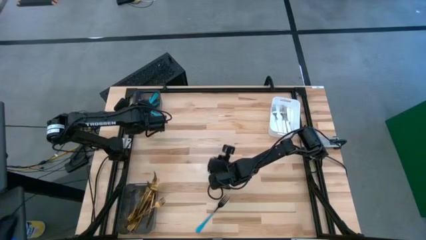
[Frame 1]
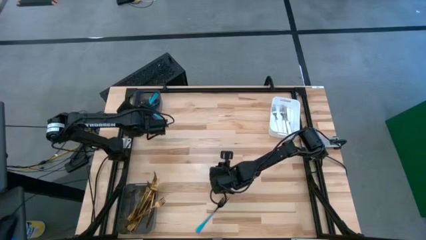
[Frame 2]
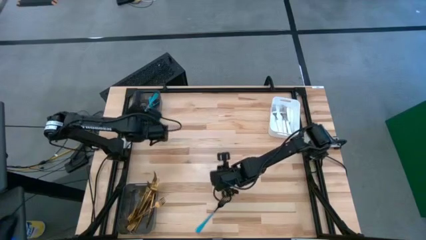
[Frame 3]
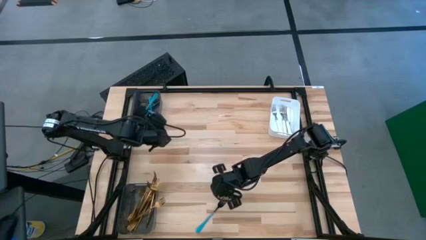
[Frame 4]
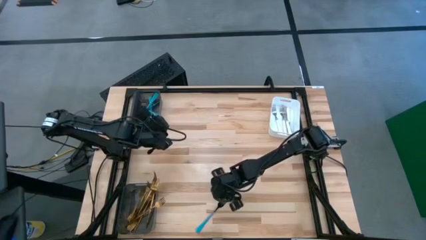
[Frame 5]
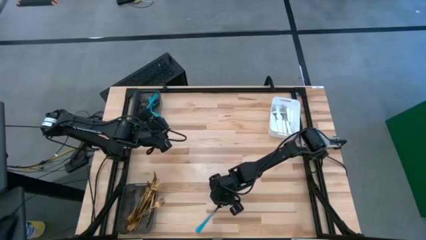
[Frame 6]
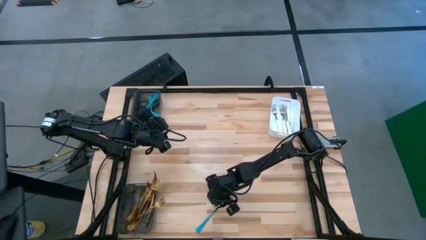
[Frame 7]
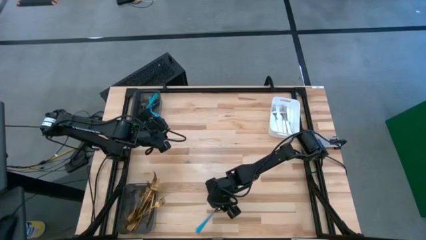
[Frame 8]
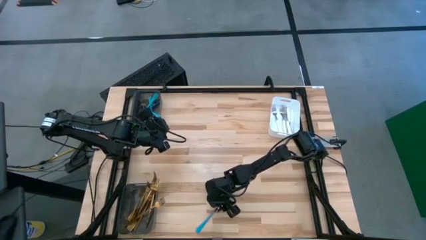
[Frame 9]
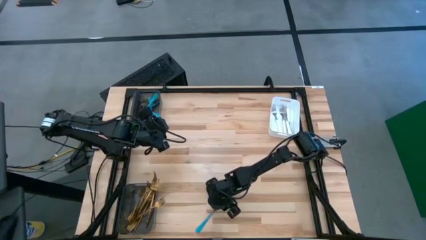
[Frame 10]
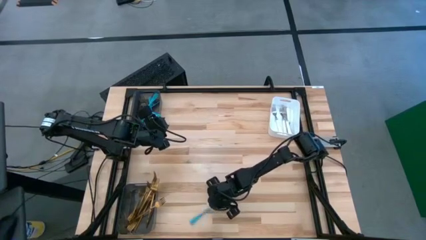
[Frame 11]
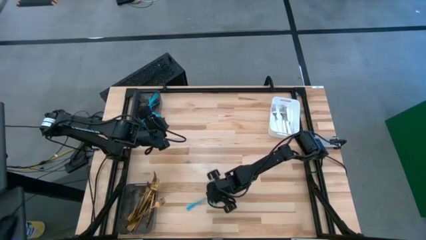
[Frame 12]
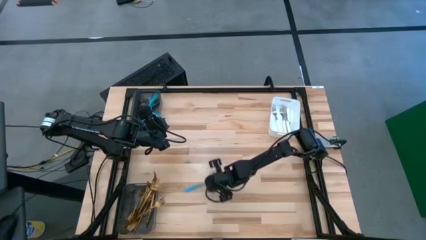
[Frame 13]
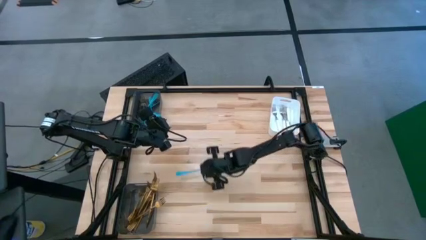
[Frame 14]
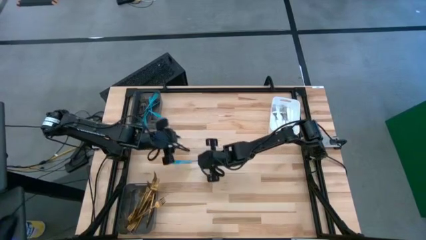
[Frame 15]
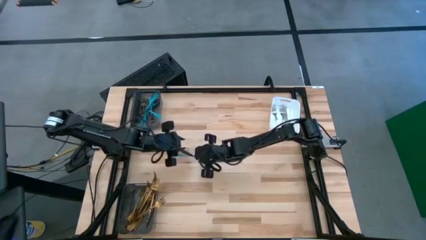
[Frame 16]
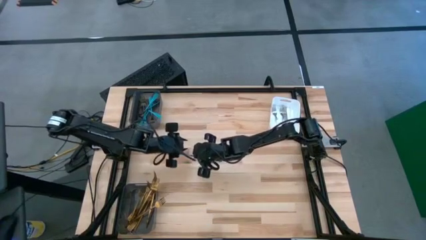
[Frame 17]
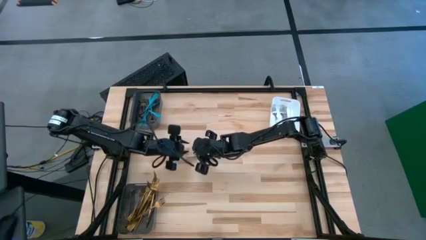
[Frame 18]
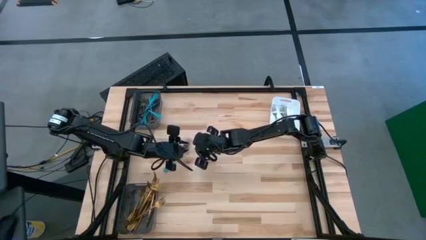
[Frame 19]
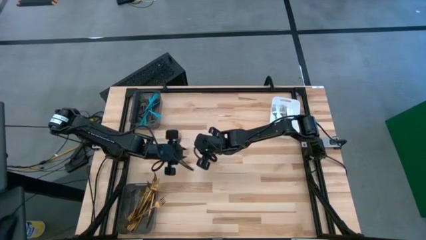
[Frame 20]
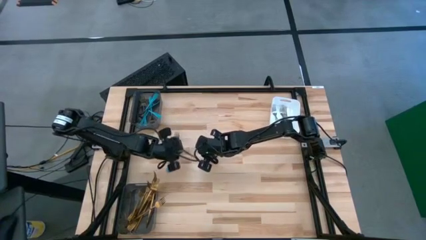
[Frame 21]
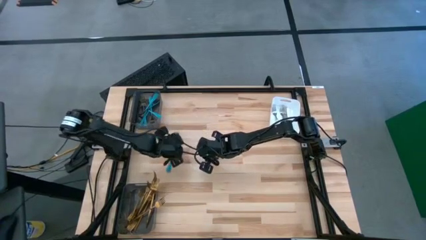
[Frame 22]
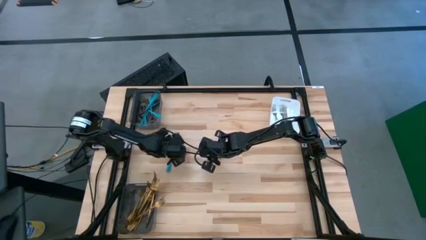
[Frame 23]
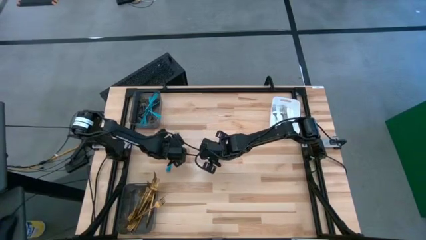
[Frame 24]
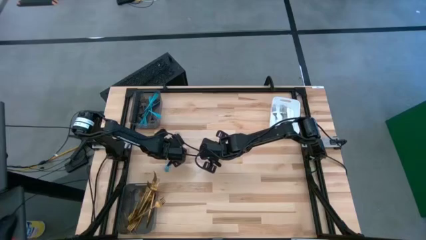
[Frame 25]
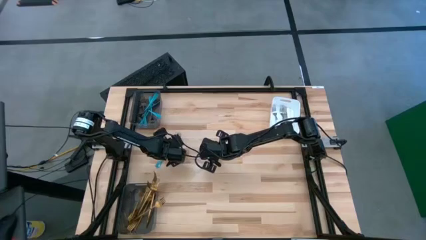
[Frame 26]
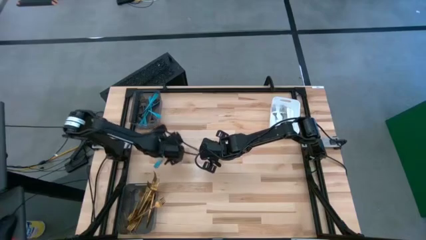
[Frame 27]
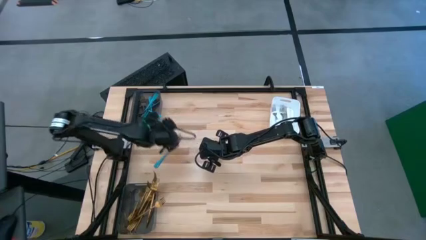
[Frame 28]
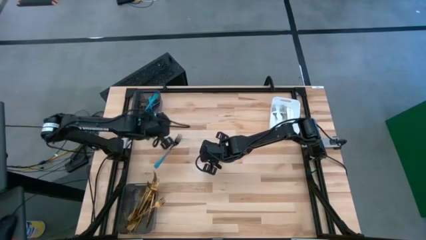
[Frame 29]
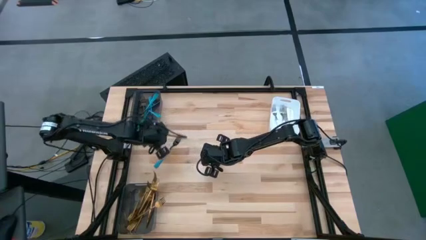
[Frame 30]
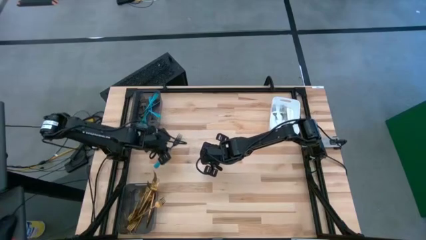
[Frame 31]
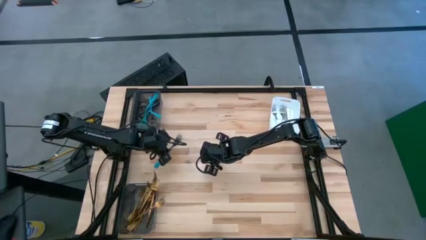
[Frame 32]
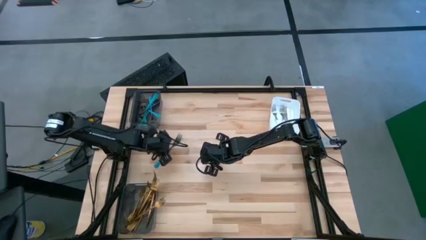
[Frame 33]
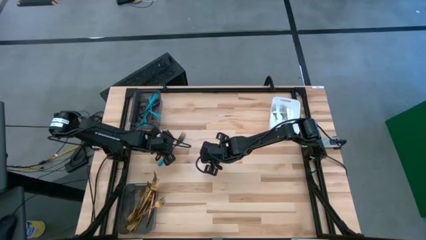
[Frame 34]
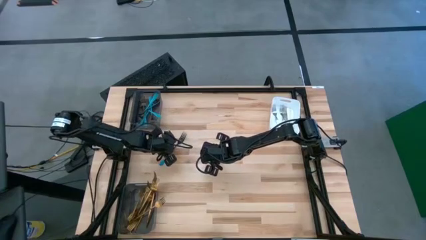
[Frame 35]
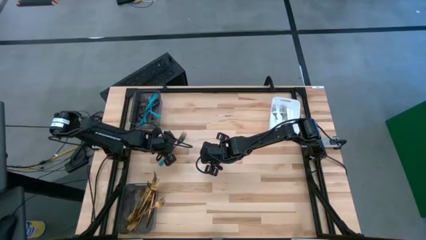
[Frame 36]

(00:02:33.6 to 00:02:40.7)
Task: Sort silverware by color (type)
Put the blue fork into the top black bin

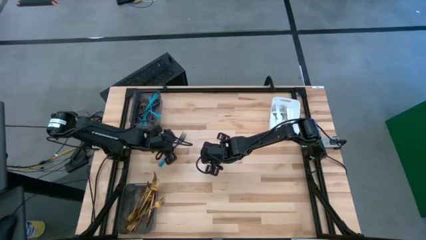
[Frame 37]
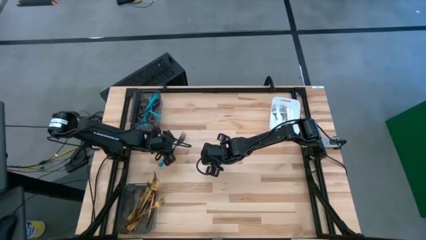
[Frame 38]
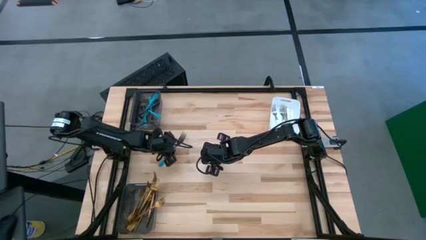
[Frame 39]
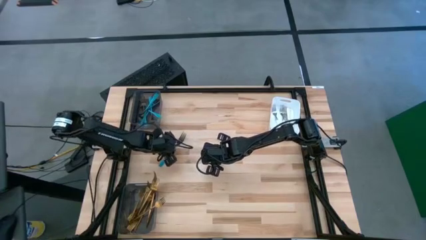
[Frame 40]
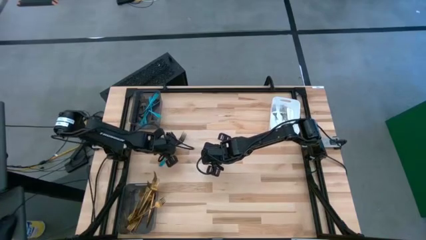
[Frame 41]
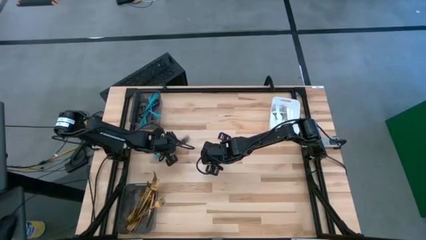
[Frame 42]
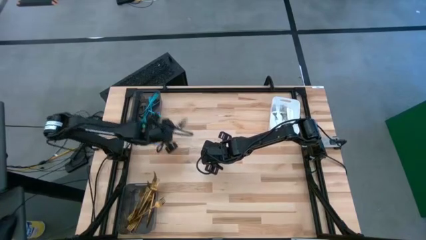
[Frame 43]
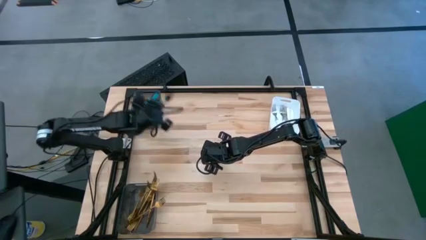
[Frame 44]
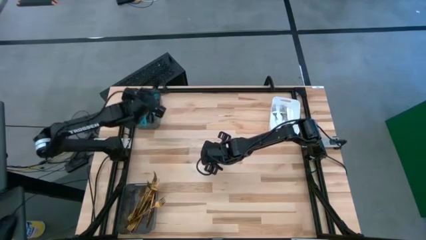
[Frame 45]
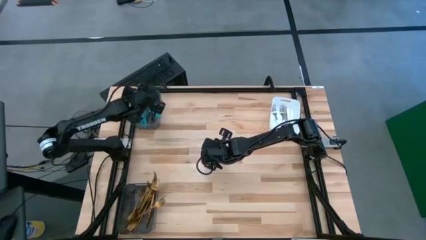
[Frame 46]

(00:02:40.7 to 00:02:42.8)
Put the blue fork into the top black bin

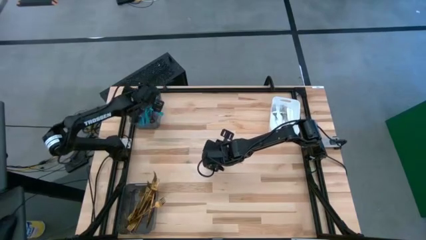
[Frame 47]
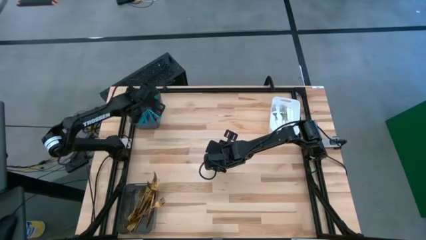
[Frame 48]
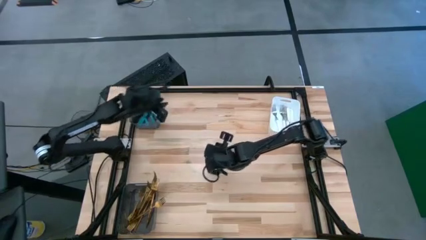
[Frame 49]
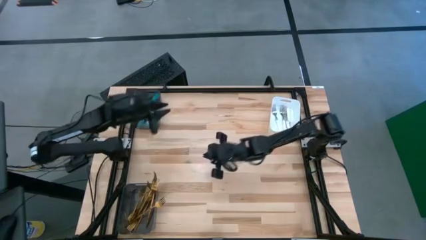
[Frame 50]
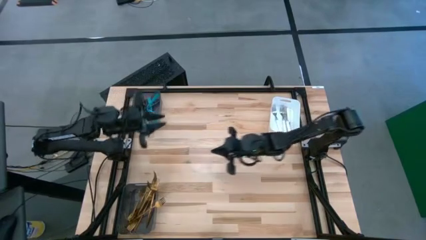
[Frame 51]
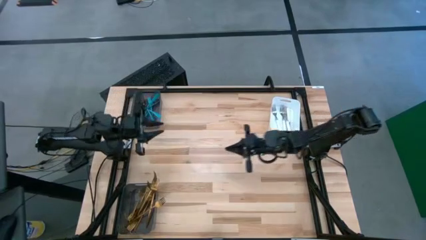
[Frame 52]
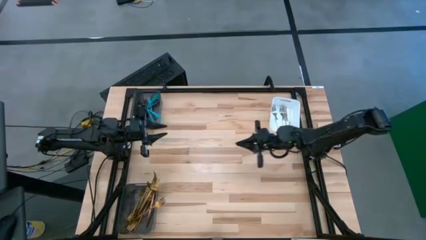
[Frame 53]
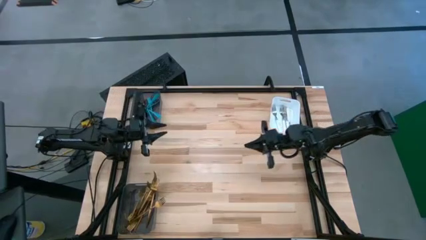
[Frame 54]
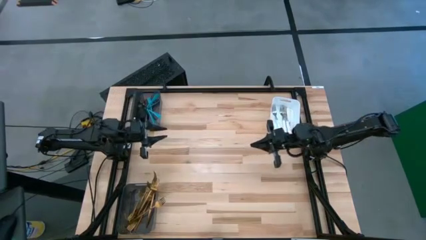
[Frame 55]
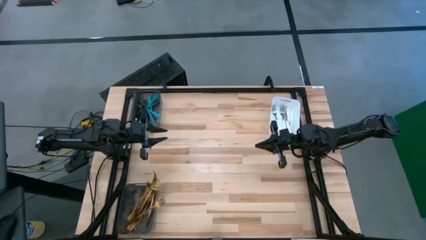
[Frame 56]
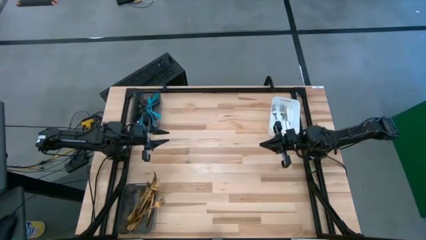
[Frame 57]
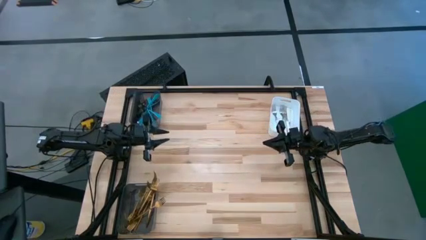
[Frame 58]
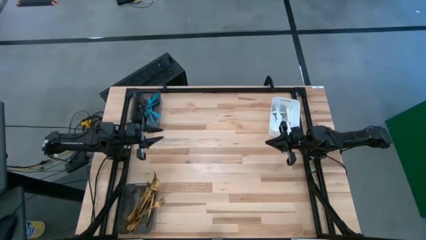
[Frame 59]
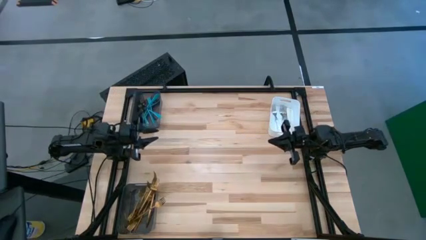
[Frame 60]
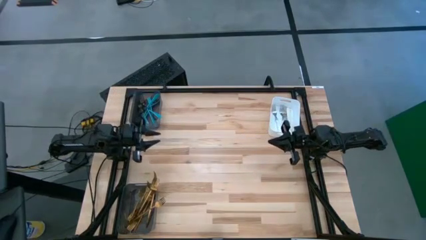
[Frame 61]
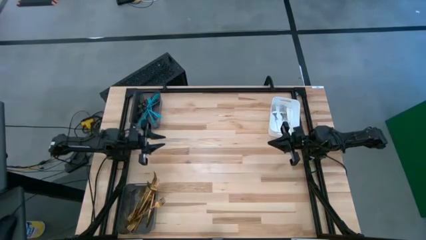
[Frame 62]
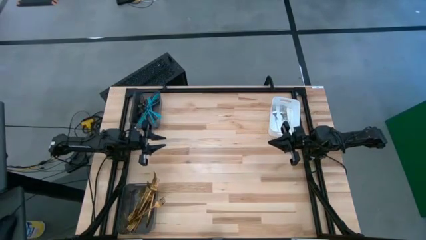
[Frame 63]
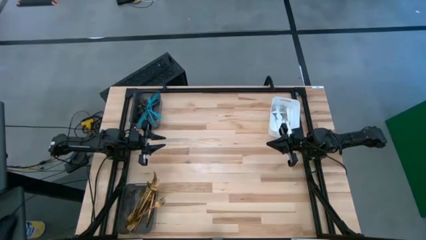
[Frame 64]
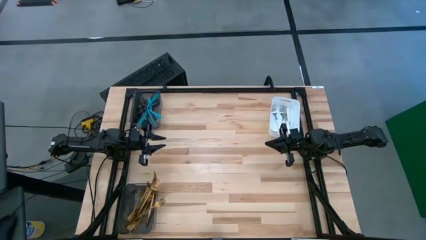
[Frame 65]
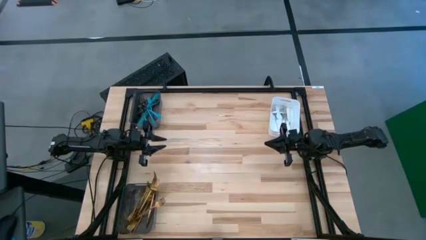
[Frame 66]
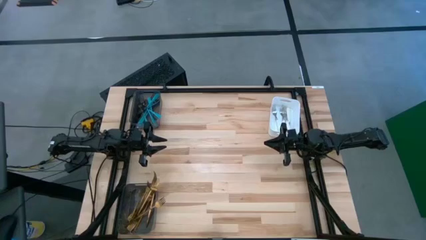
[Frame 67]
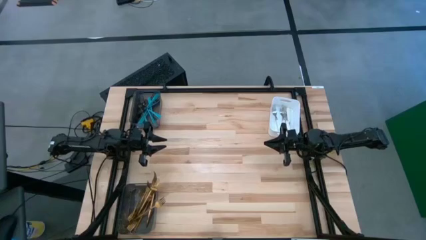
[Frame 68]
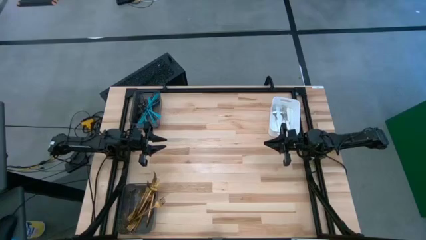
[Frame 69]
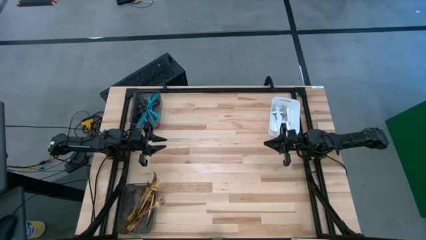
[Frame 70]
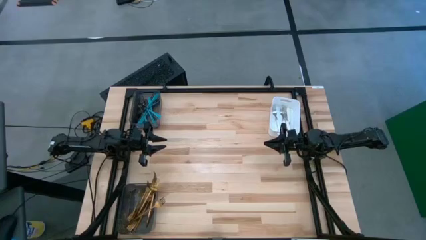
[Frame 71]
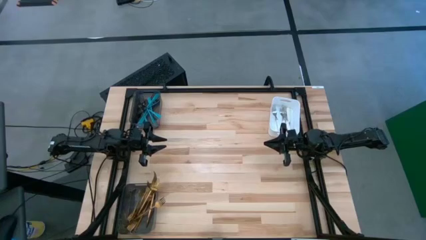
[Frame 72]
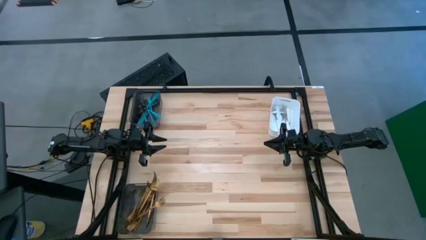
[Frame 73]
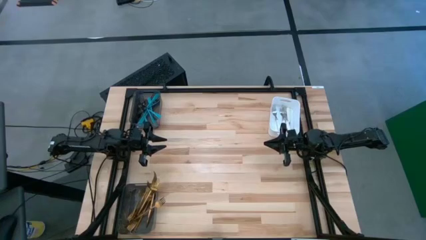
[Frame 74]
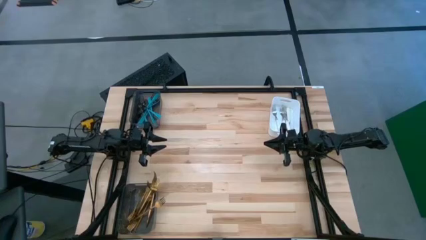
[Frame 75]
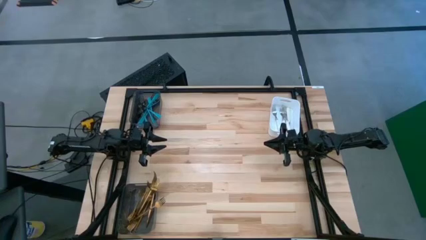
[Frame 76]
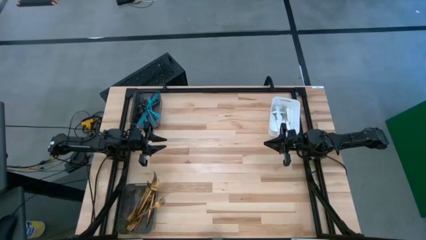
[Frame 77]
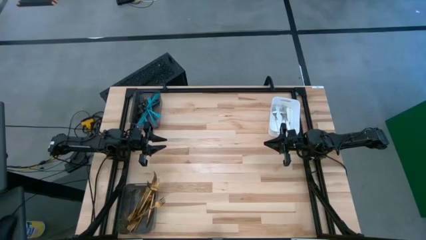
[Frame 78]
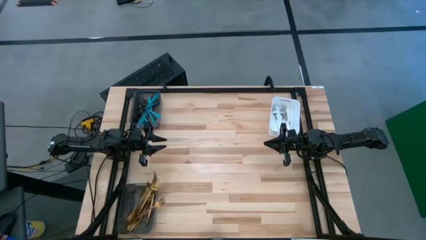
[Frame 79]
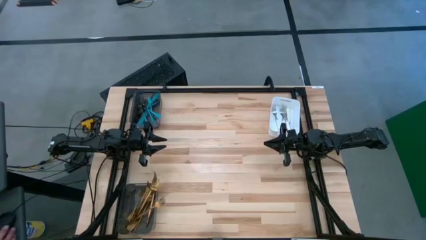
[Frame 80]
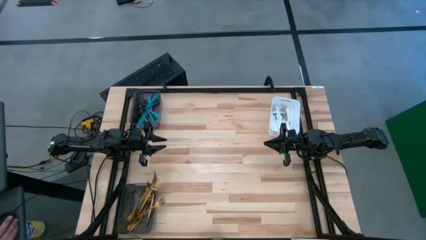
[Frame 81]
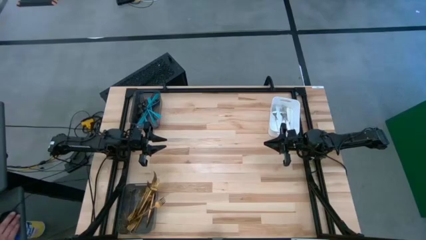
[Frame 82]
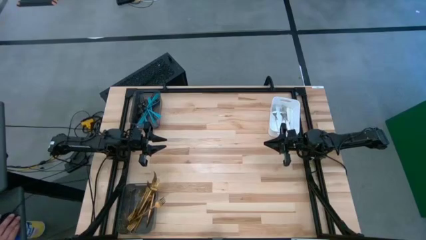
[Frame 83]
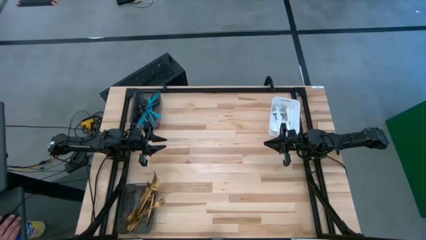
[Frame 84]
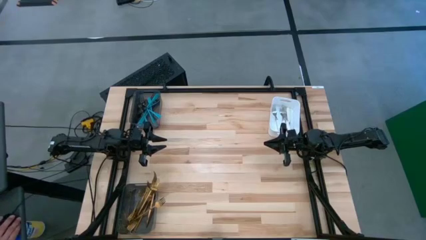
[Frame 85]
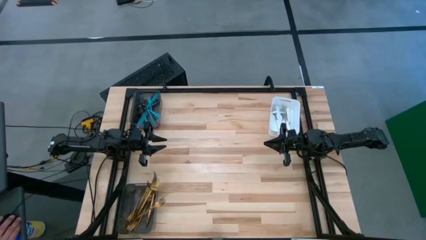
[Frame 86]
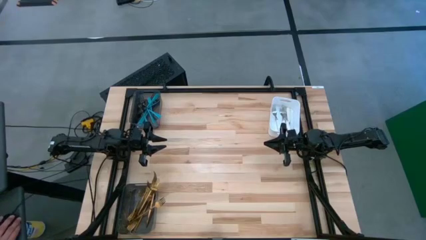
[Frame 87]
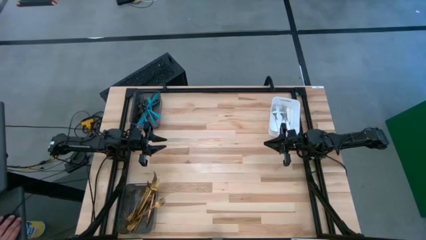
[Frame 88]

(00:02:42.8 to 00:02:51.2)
Return to Home Position
